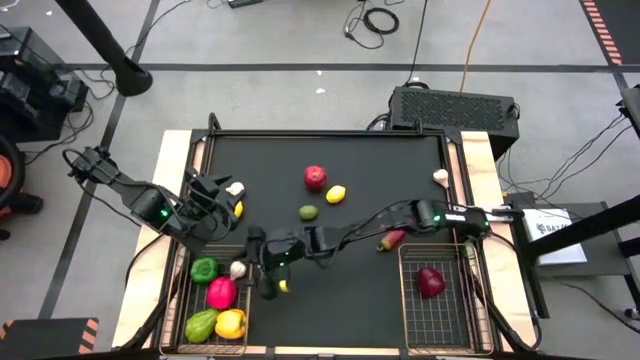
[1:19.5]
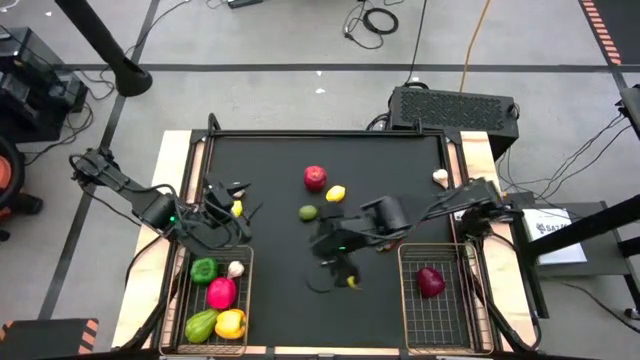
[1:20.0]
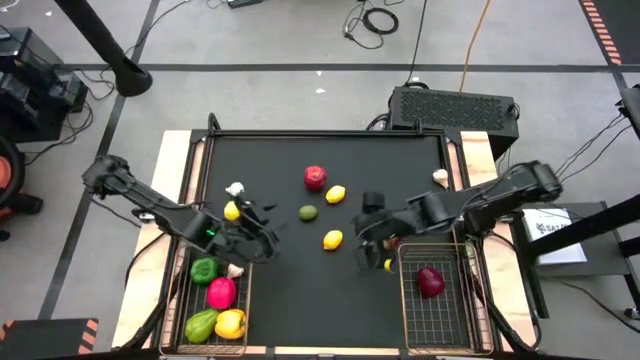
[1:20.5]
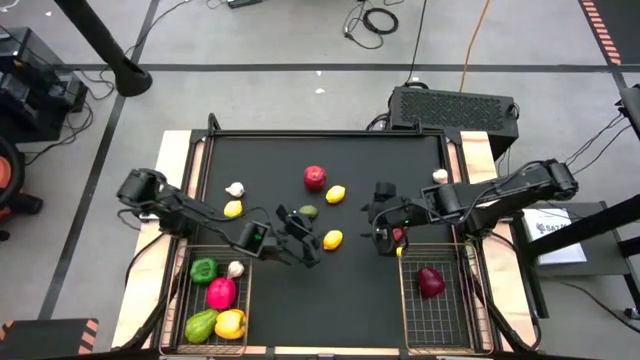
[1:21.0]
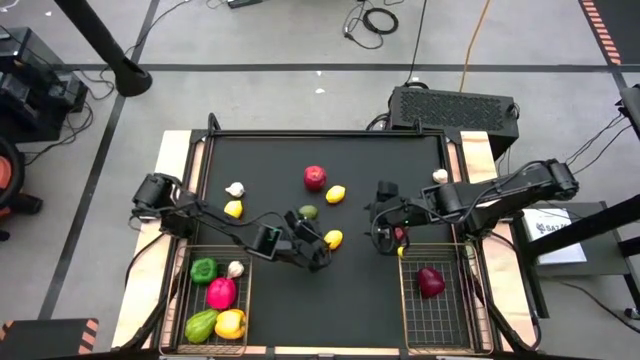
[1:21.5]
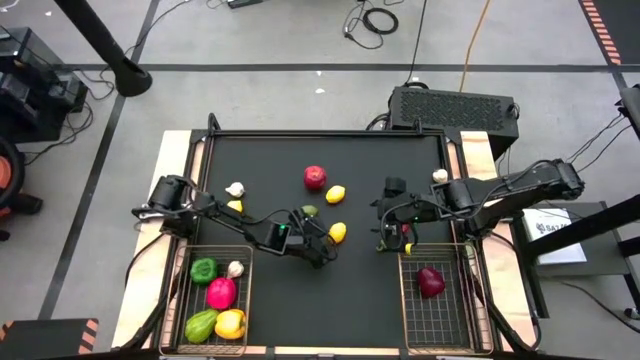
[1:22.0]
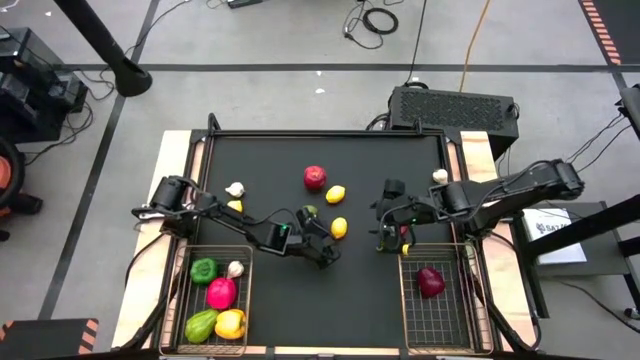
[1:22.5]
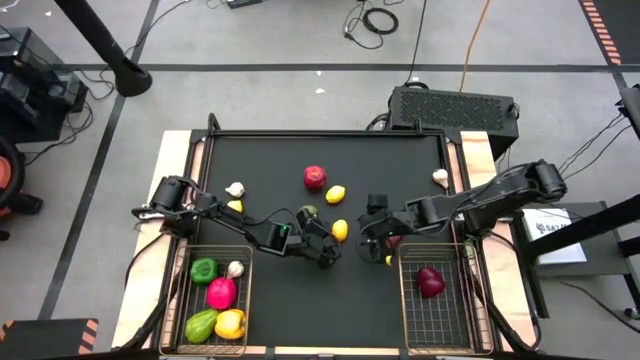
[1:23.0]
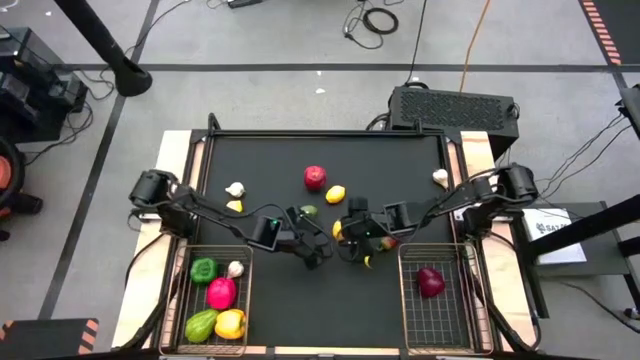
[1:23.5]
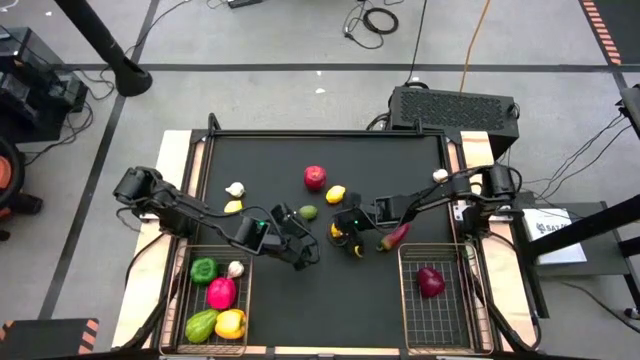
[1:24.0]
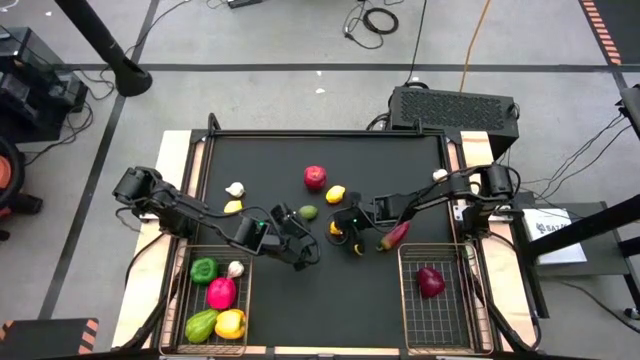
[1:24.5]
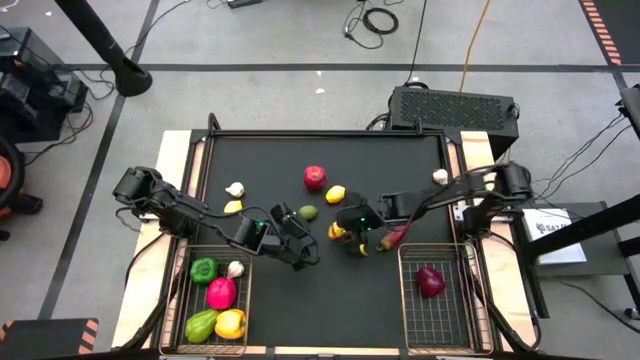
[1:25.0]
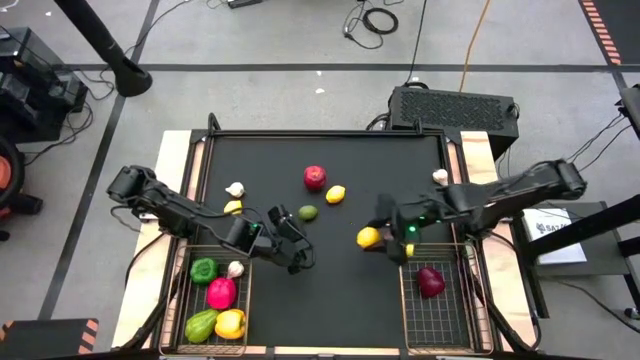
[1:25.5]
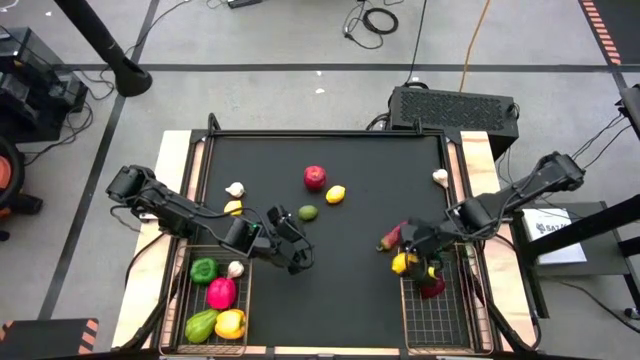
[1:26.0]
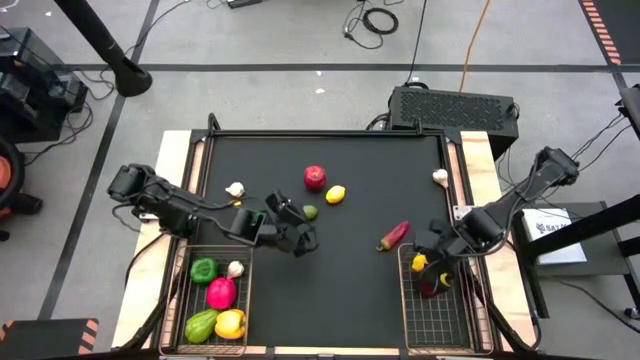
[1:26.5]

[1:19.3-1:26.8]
Task: Sort produce into baskets
Put the bottom lemon into the right gold wire basket

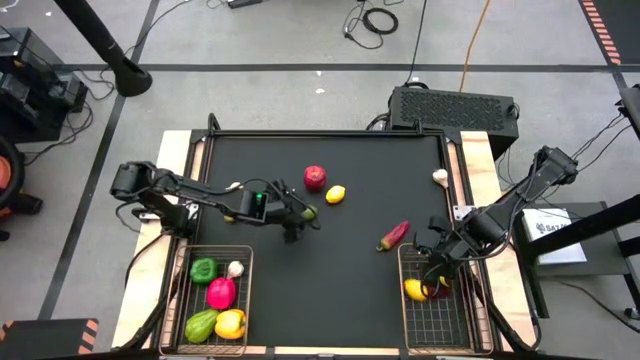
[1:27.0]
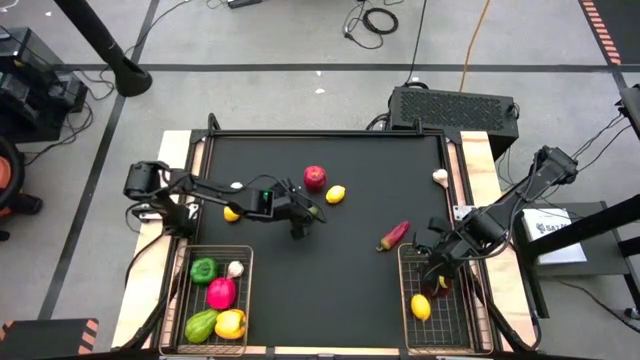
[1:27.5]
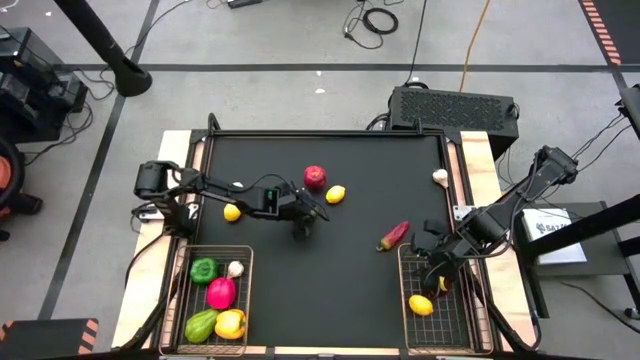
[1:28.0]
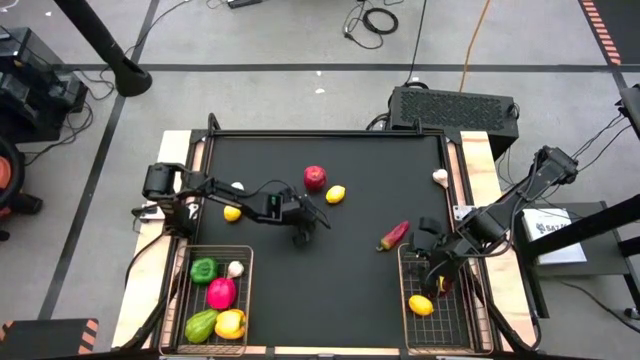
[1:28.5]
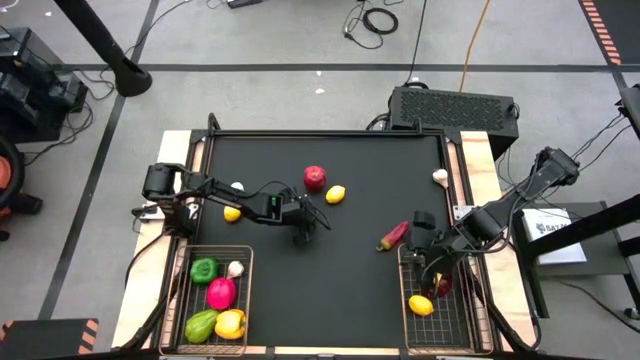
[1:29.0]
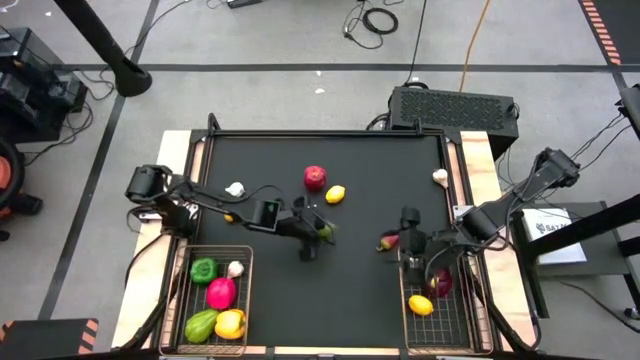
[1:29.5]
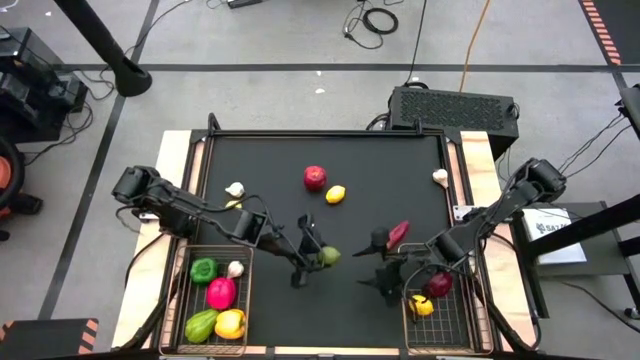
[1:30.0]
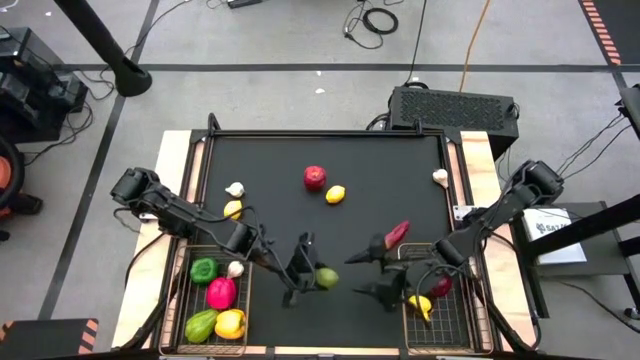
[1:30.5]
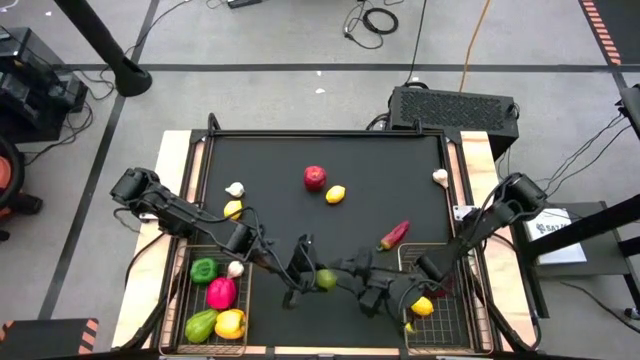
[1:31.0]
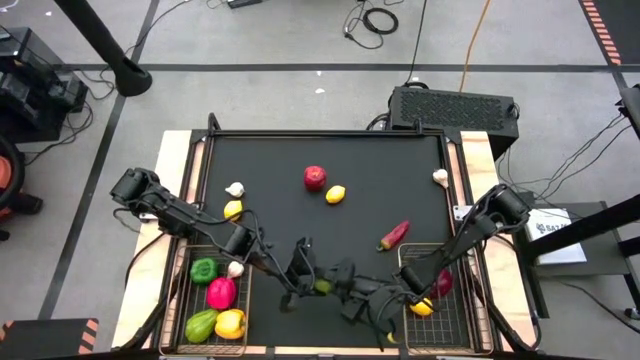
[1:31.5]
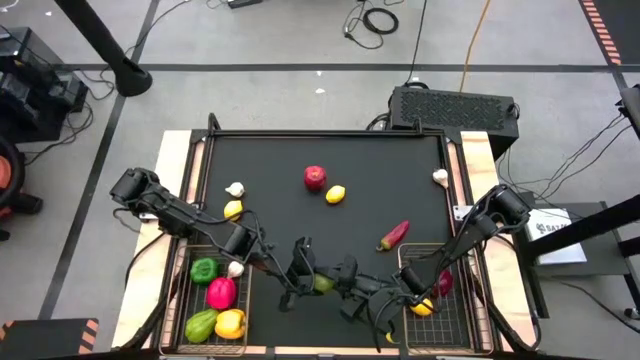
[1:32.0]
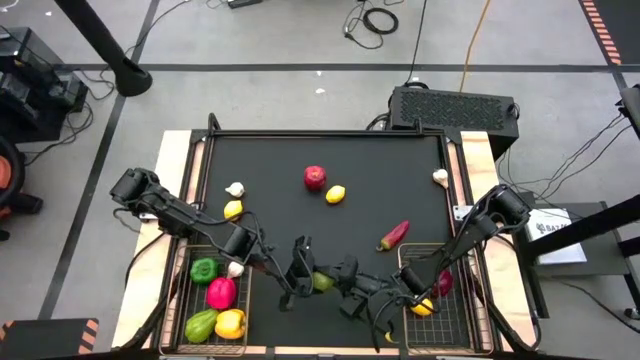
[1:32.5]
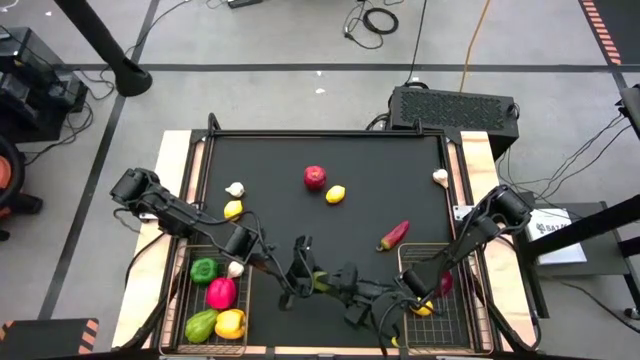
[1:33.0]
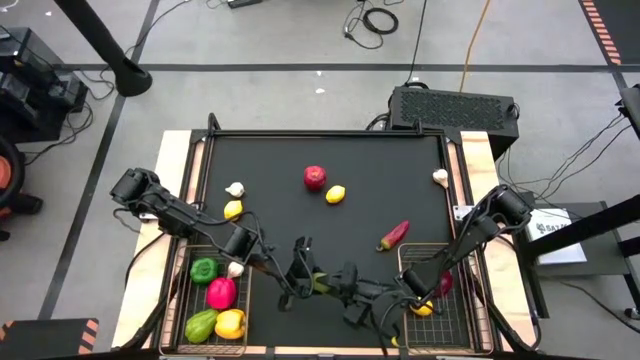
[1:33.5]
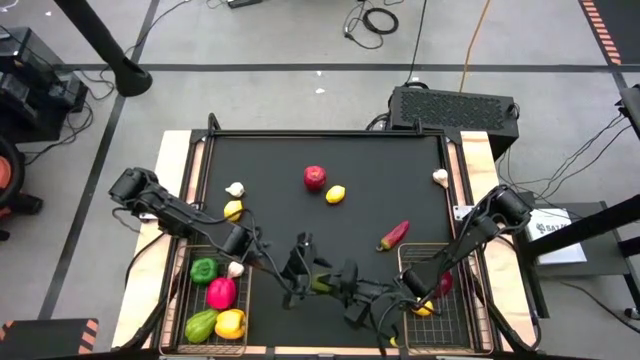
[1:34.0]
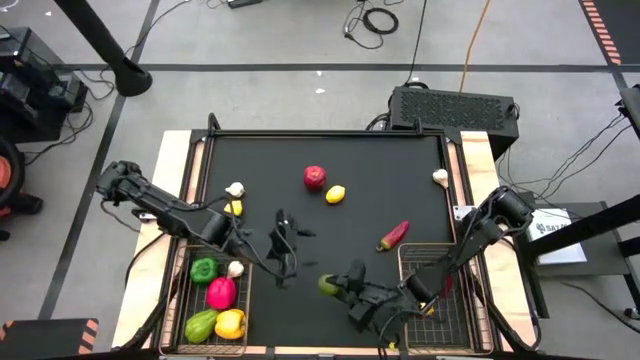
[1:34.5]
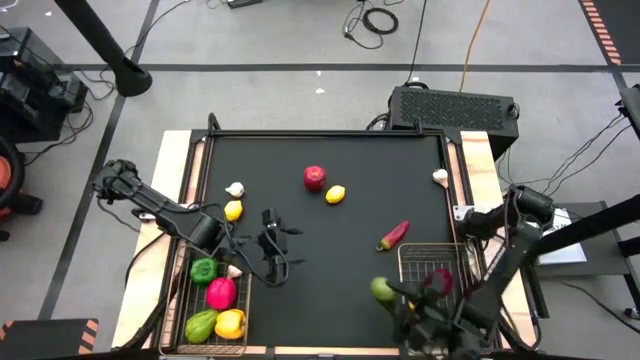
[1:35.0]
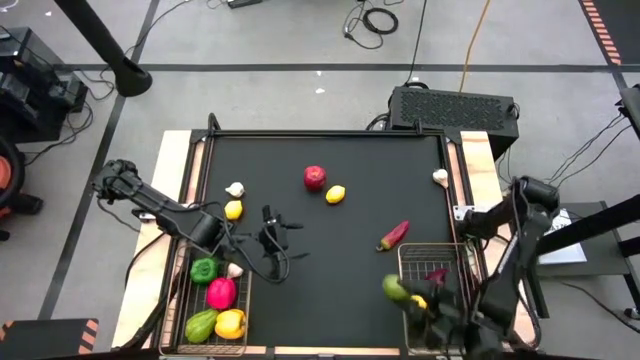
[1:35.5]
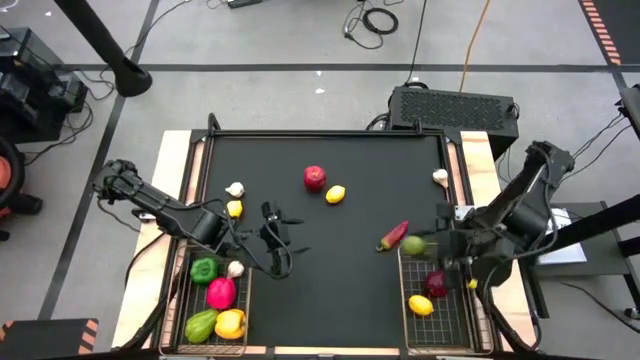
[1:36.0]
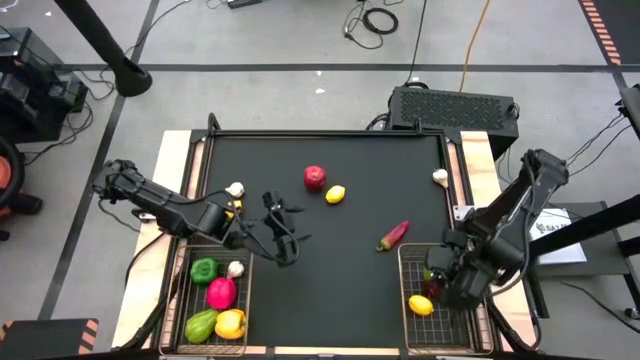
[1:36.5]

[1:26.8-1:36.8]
Put the lime into the right gold wire basket

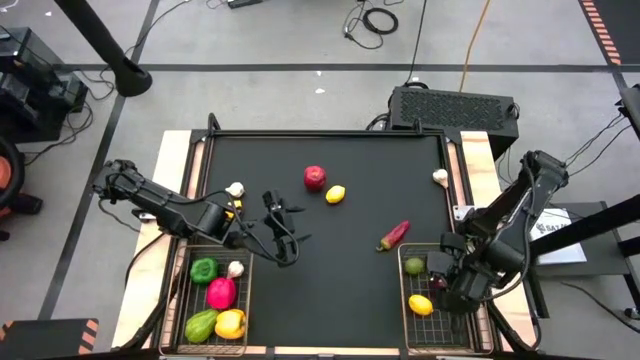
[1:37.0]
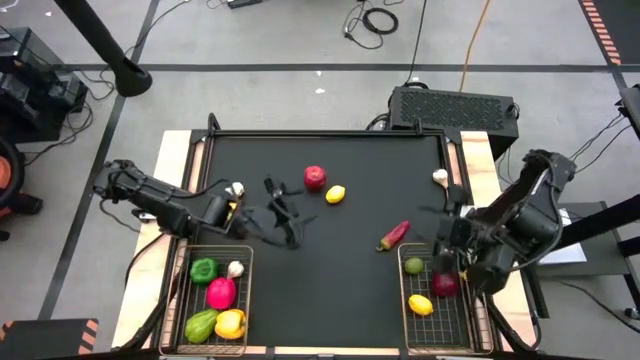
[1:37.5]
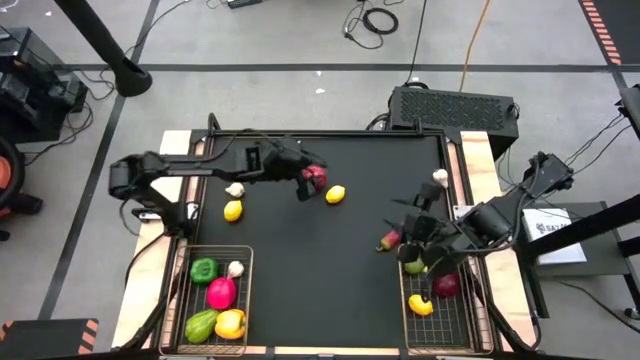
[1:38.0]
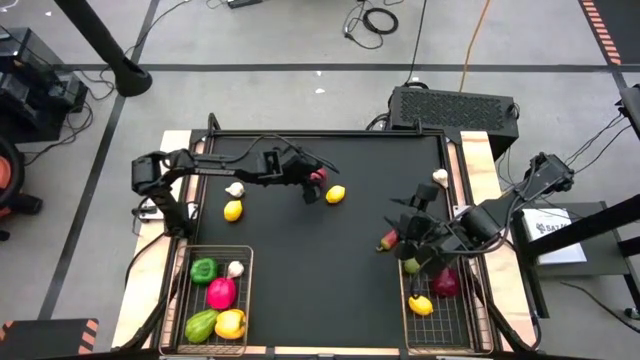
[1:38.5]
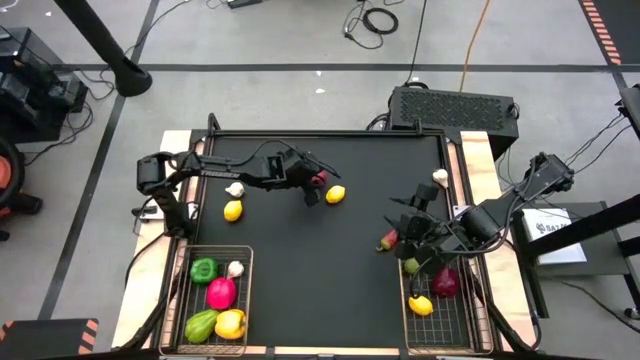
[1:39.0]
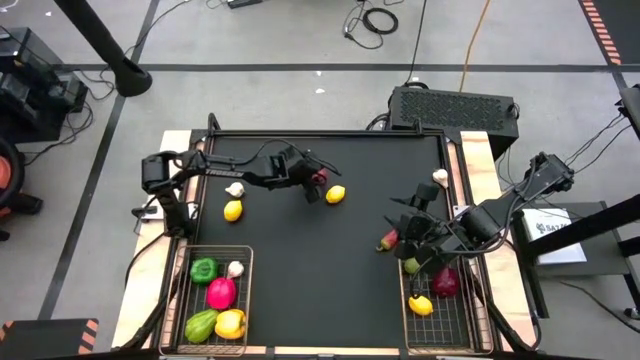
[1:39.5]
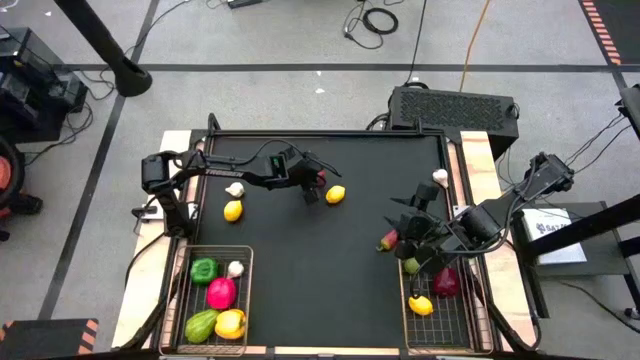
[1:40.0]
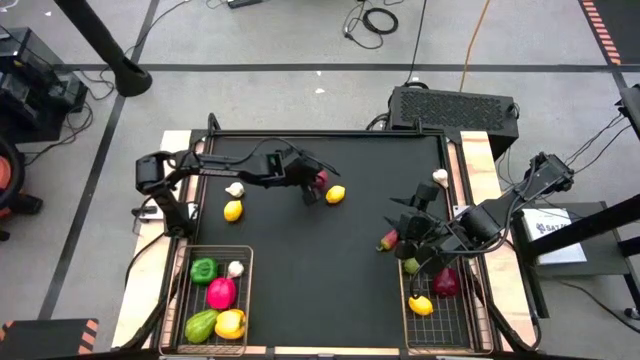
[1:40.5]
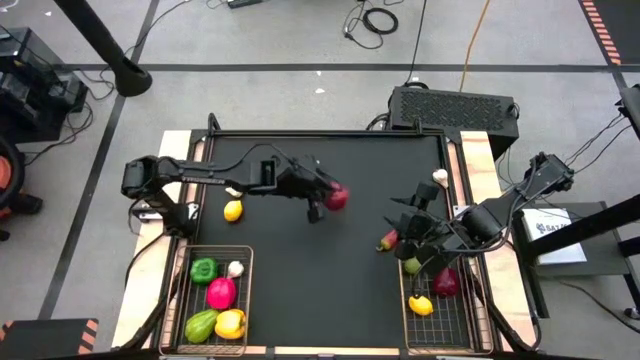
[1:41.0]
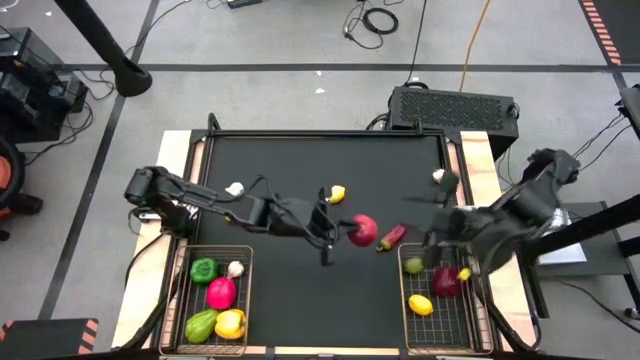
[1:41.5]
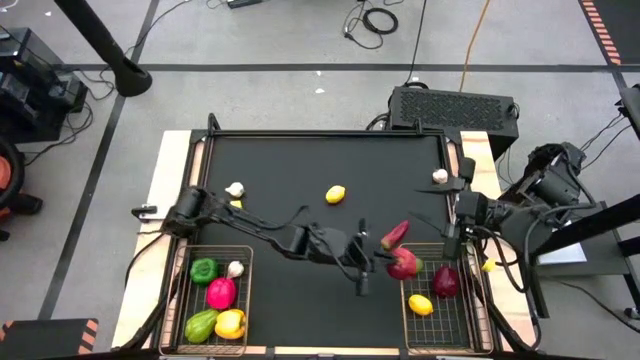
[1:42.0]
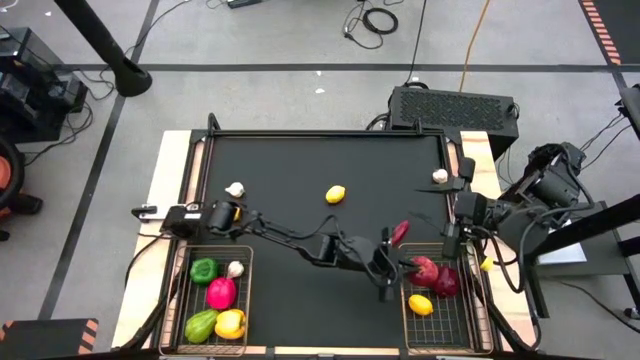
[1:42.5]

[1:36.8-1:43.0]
Put the apple into the right gold wire basket
